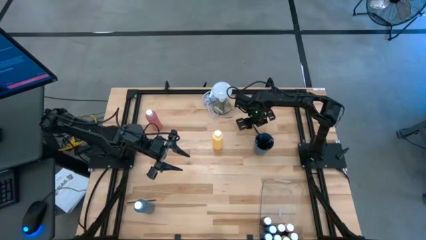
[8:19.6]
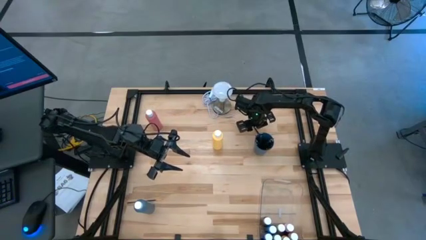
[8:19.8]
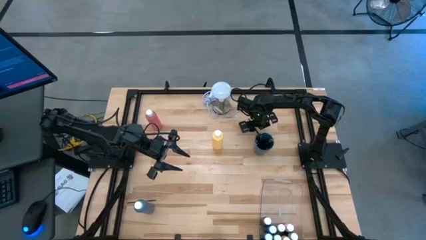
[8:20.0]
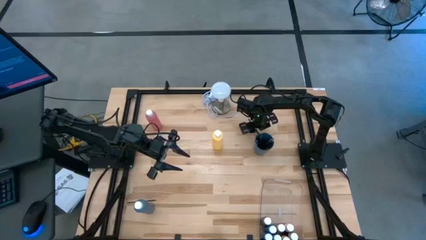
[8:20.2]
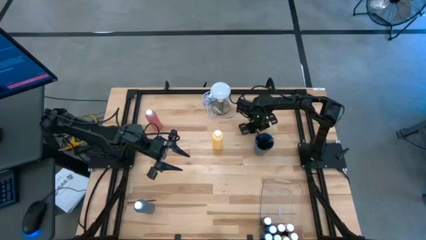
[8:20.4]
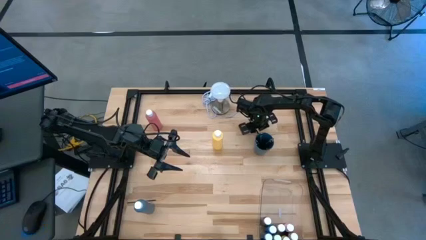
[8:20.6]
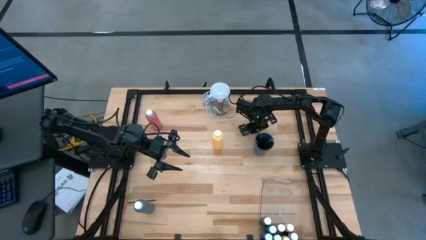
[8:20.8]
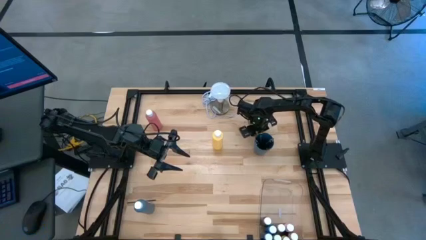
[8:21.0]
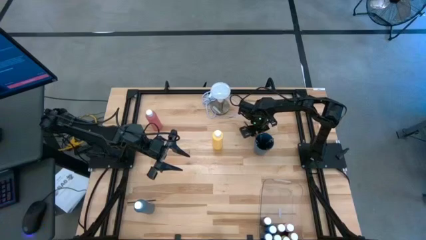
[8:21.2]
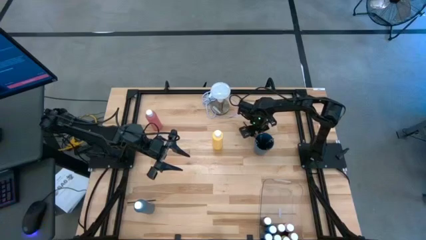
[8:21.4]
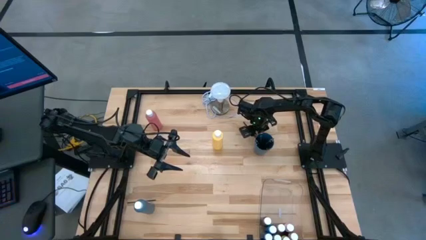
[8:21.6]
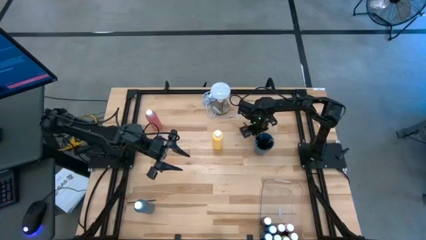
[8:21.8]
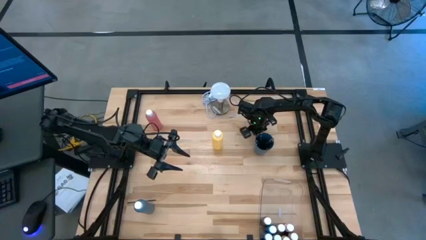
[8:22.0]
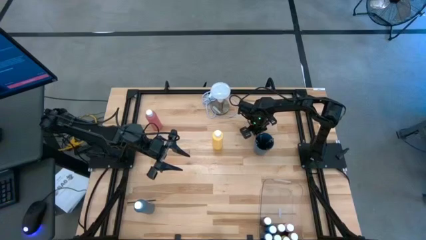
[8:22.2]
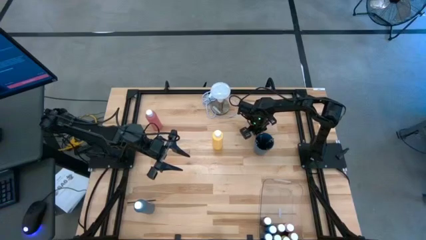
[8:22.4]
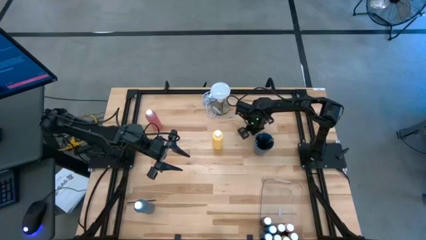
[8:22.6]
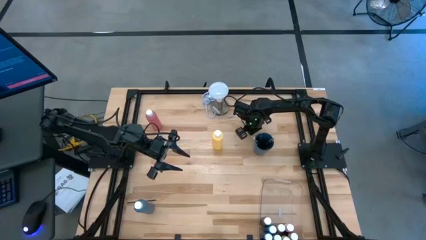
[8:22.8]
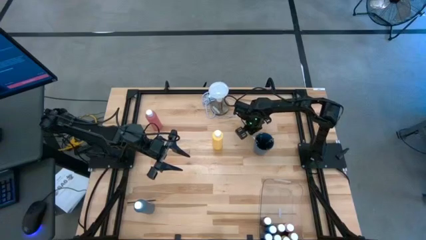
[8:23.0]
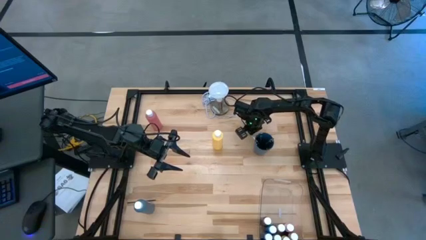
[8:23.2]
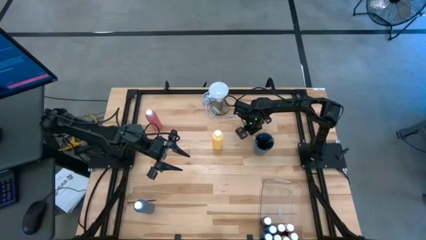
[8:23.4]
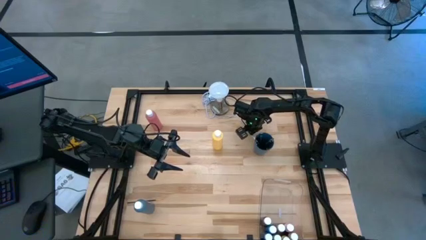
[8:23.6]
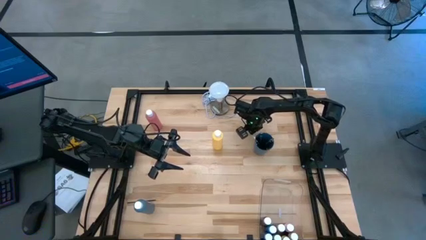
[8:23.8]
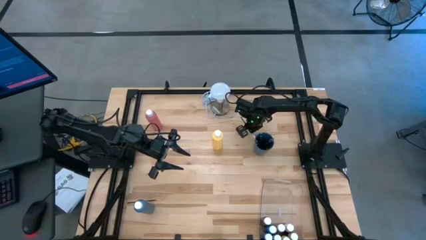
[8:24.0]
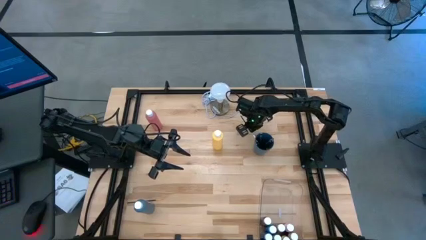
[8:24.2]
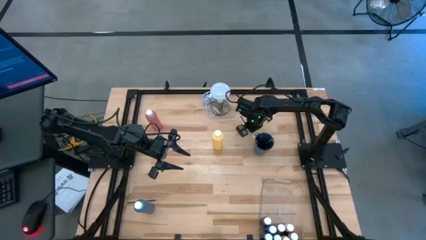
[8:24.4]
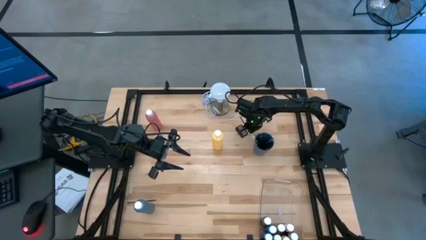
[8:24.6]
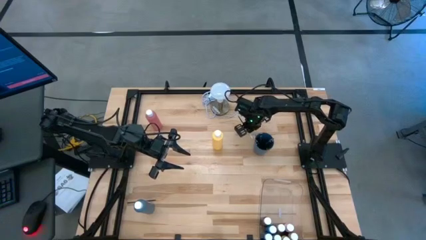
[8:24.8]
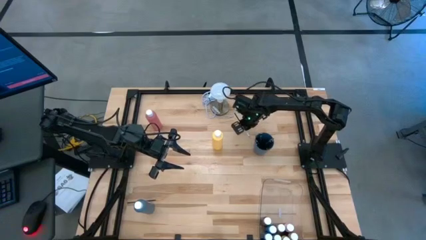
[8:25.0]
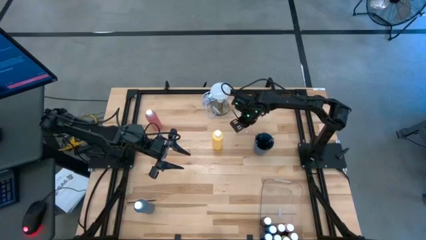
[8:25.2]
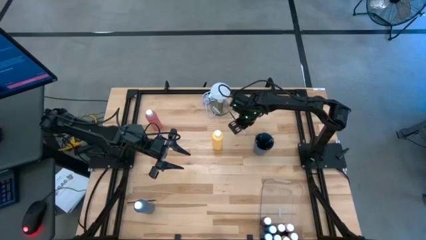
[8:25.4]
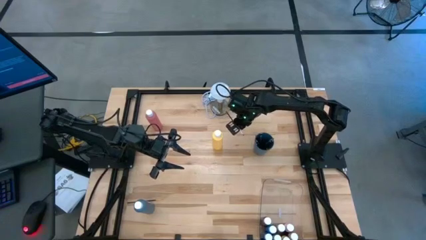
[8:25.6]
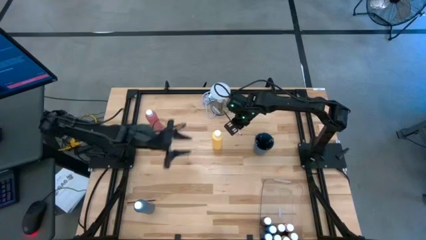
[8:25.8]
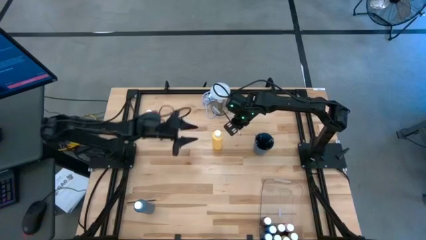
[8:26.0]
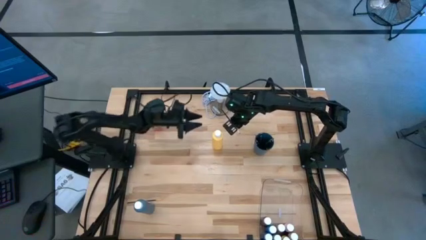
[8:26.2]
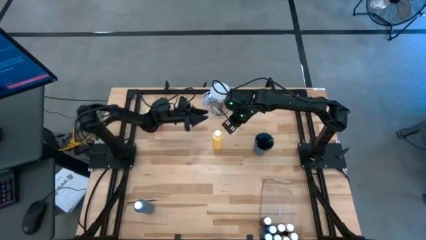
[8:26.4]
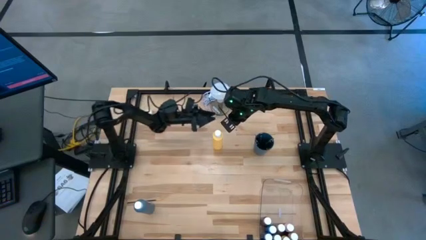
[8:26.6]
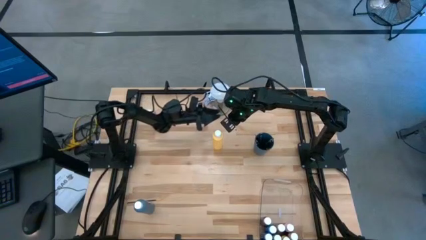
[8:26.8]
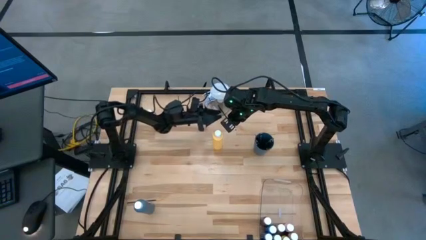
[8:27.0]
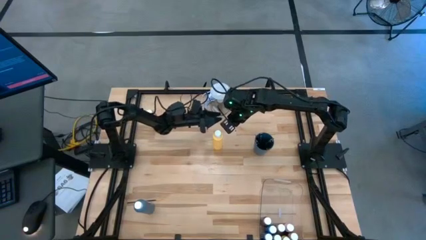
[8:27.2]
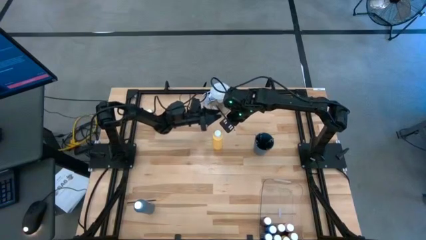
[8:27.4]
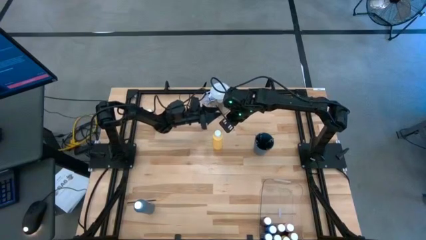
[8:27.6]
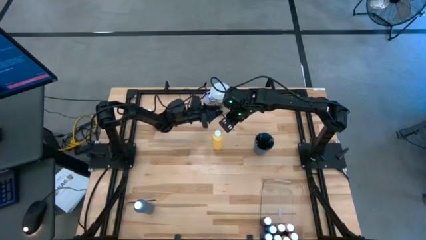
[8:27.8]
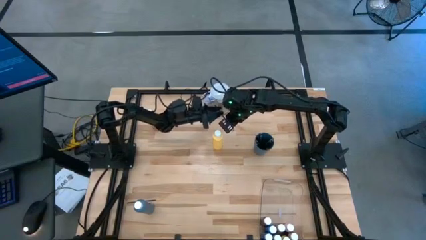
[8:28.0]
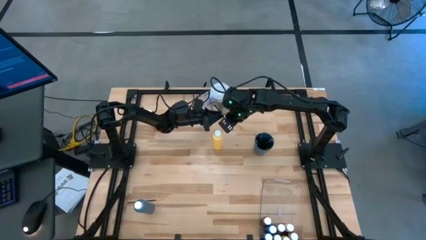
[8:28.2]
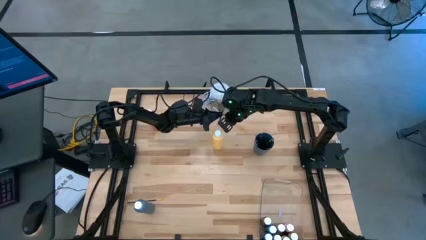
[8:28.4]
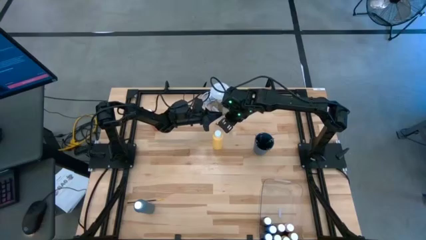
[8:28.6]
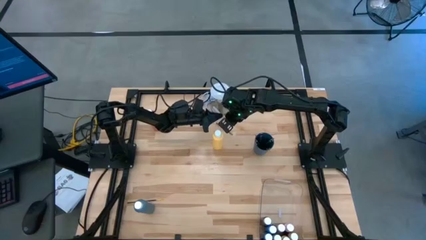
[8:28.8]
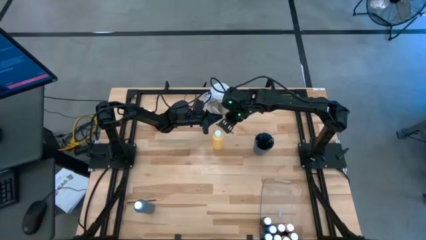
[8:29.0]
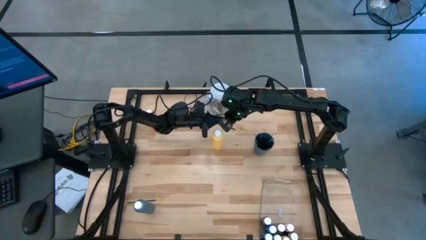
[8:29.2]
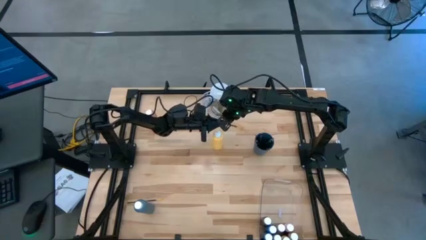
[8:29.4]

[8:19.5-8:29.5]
Task: Pick & Place Paint Supplies
Put the right black silver paintbrush into the blue cup

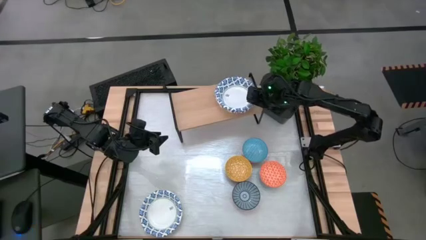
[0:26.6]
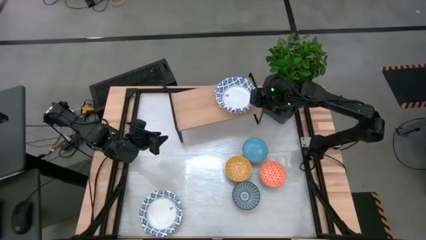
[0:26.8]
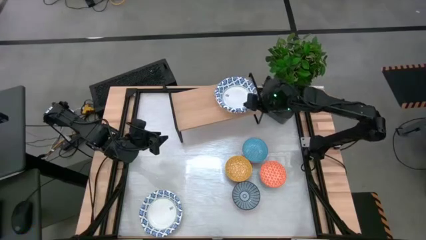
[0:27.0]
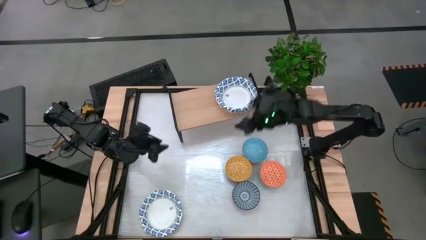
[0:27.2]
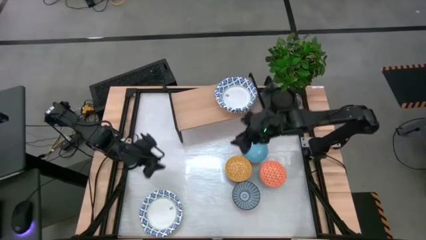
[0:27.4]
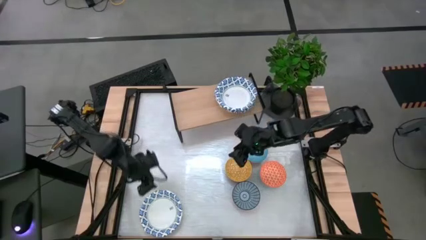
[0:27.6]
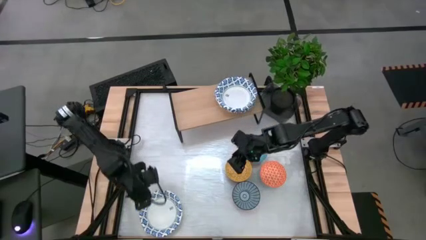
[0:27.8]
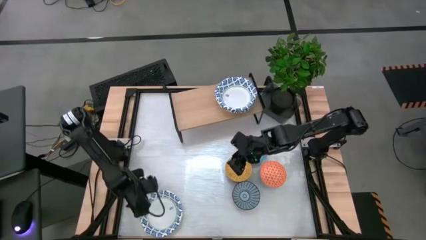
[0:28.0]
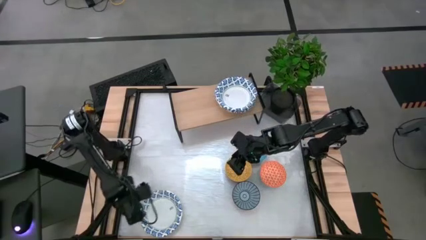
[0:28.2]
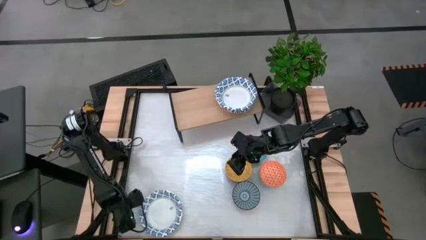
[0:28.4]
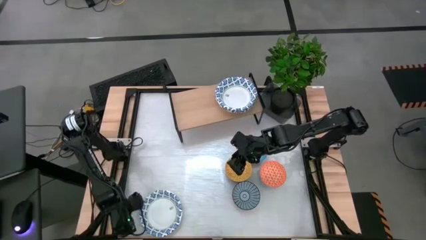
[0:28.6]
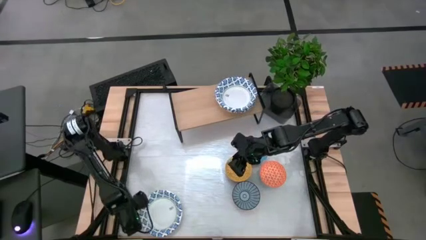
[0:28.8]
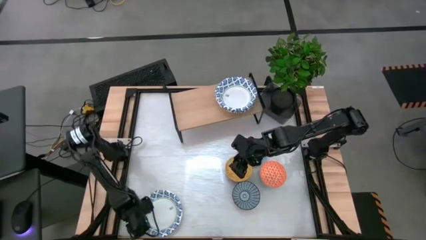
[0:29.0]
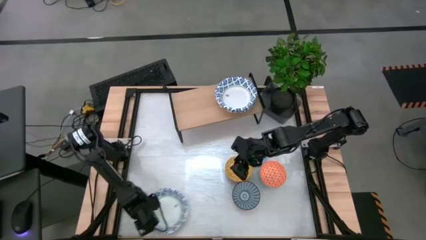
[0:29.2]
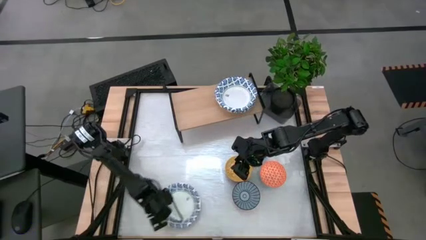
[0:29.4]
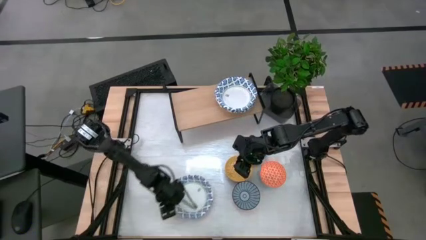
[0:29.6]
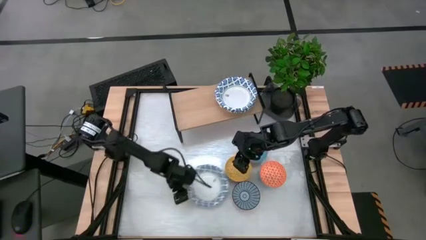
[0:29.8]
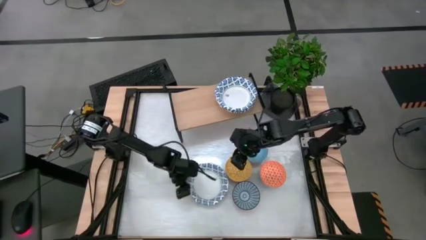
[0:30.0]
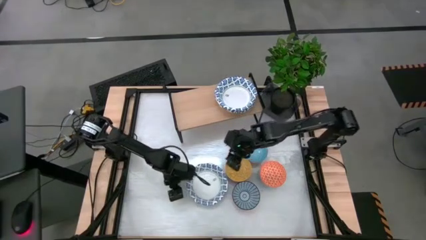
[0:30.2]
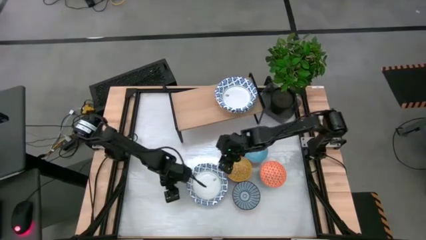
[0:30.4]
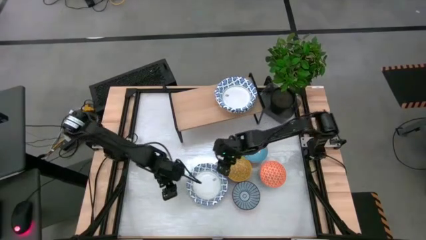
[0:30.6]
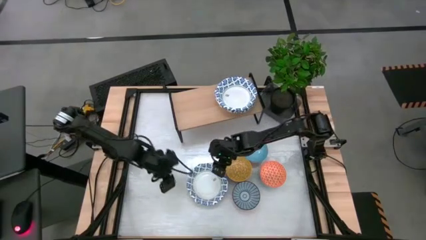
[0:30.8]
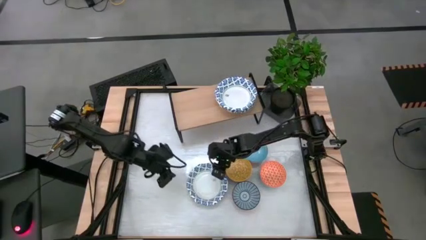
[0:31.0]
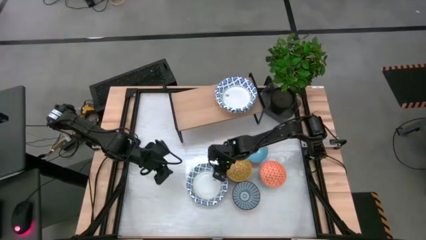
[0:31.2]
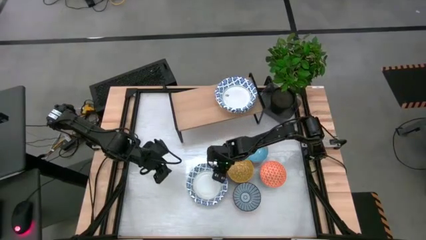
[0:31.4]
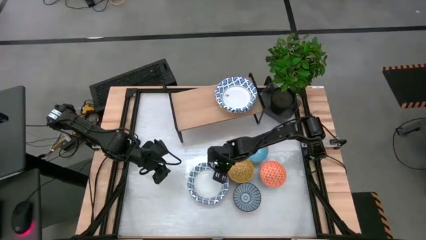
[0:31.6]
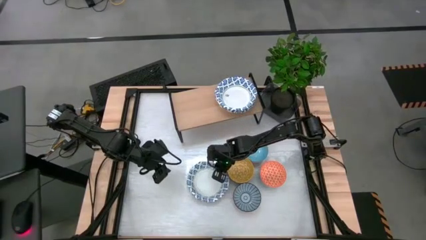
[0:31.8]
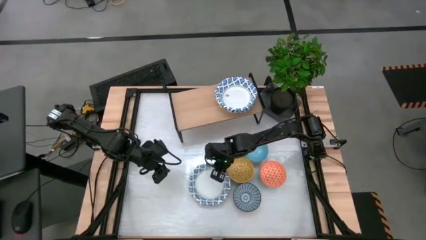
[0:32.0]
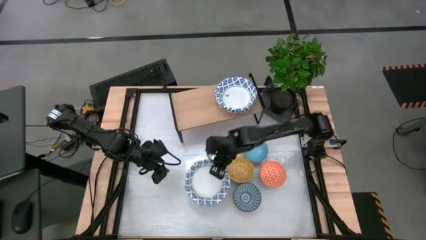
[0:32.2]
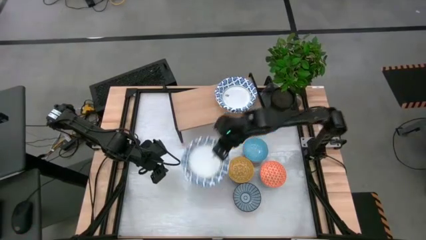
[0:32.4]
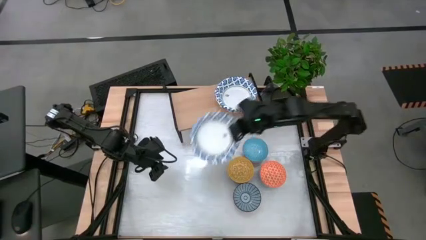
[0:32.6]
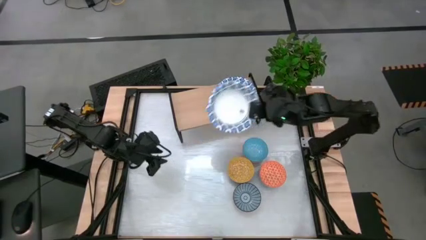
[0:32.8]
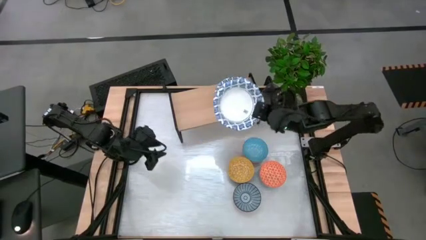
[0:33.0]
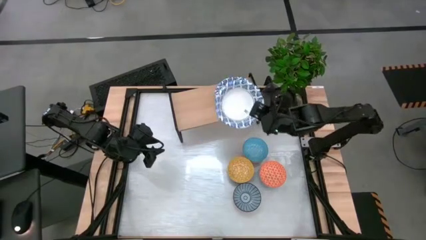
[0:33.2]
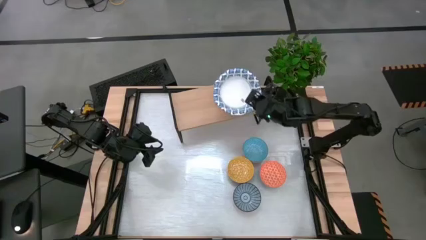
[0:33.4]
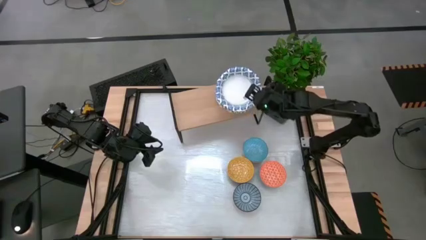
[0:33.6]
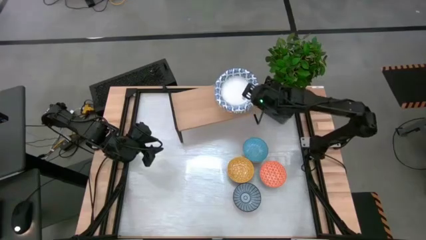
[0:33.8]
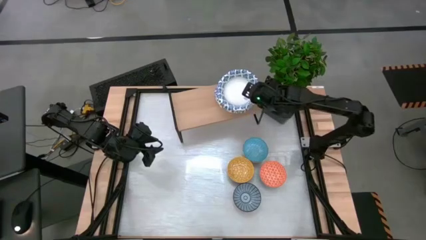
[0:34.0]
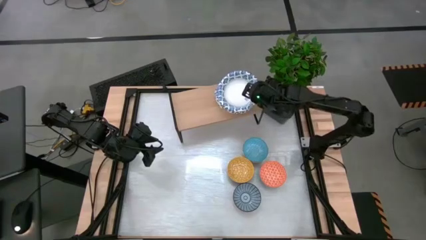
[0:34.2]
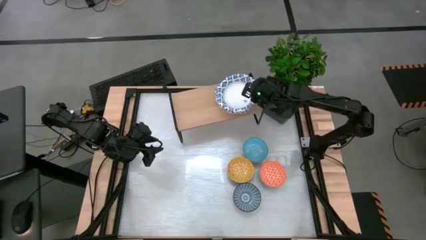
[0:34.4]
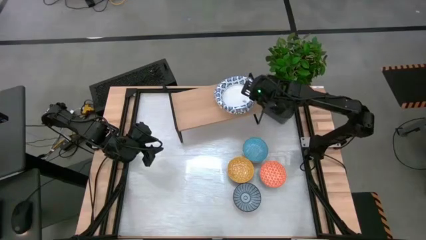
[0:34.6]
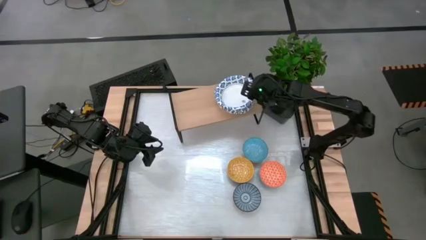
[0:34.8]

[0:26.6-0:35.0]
Task: Place and stack bowls onto a shelf
Stack the white patterned bowl on top of the white patterned bowls on the shelf
